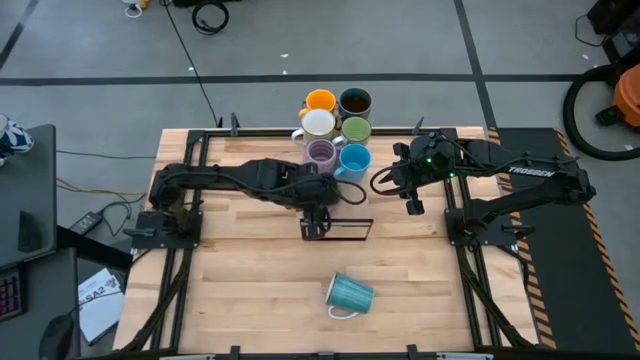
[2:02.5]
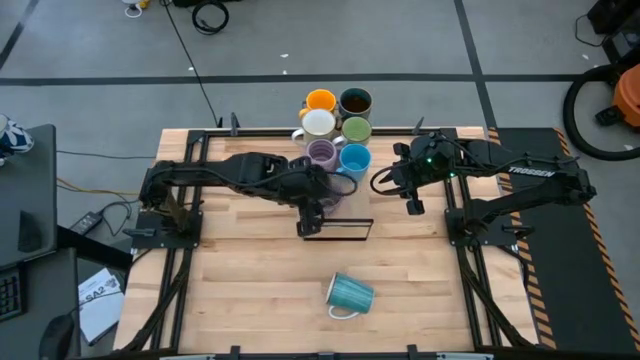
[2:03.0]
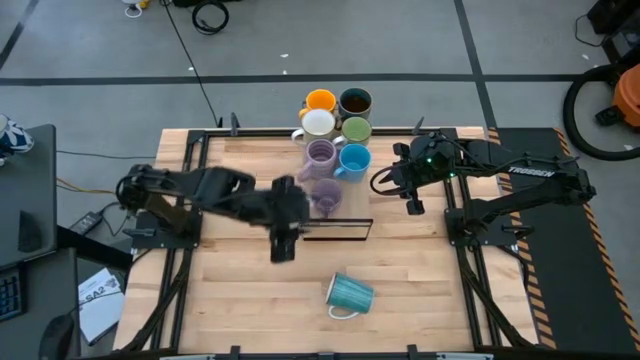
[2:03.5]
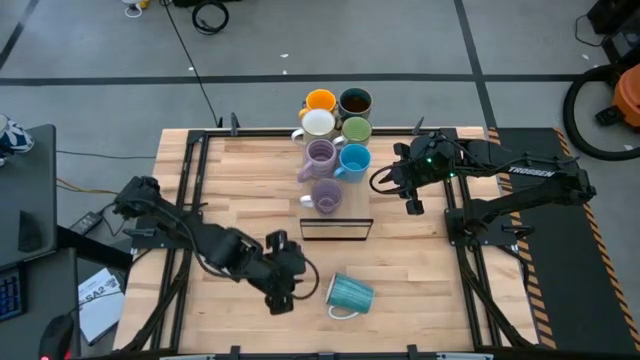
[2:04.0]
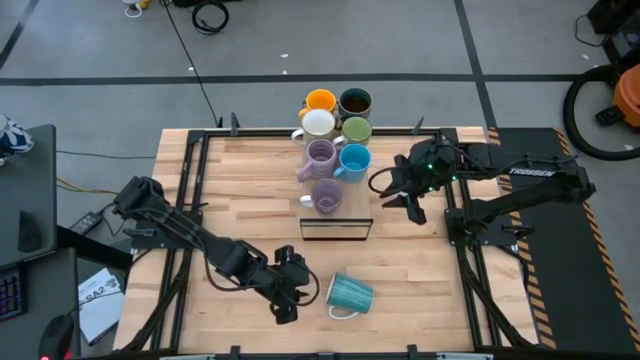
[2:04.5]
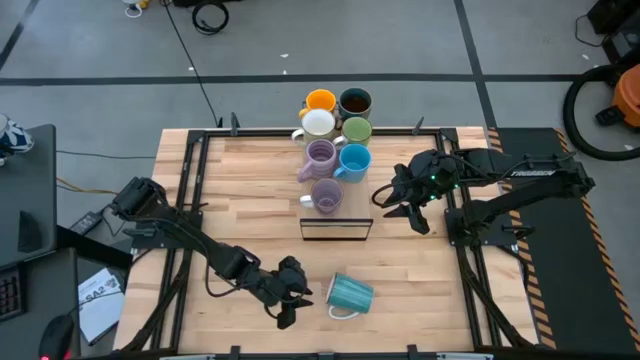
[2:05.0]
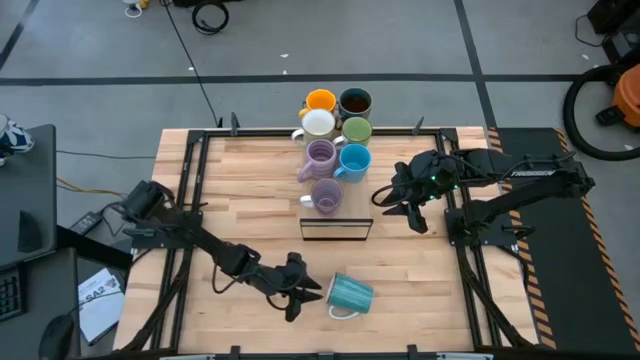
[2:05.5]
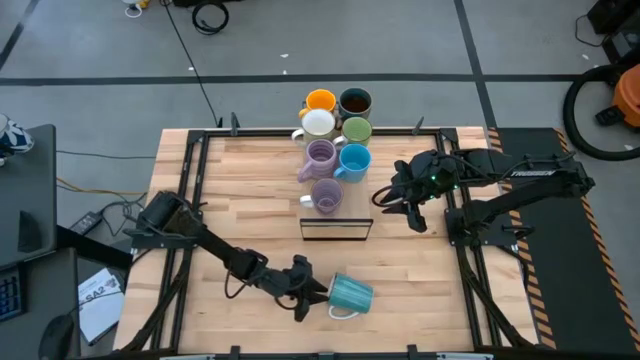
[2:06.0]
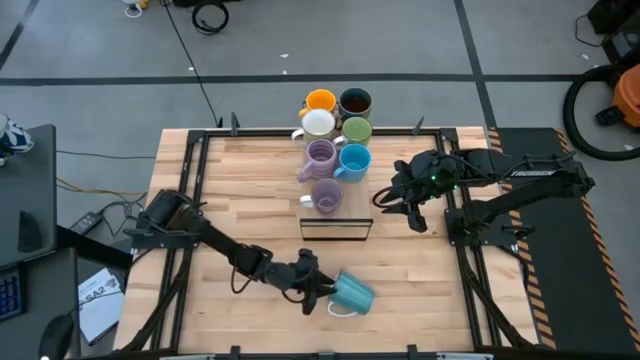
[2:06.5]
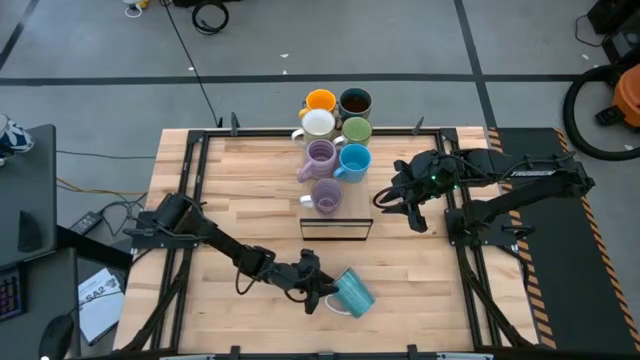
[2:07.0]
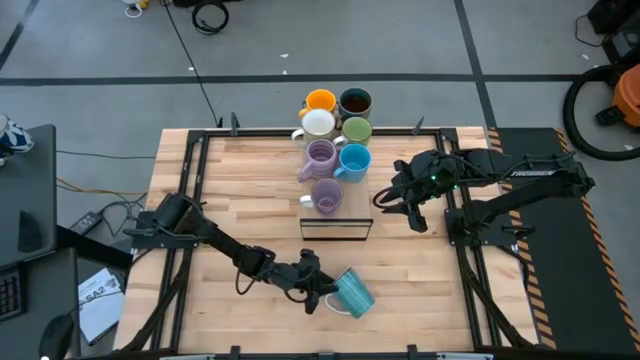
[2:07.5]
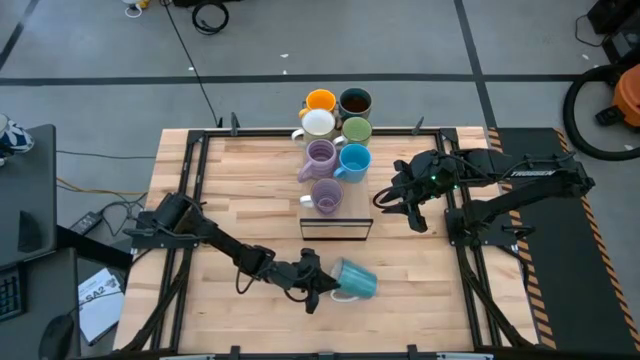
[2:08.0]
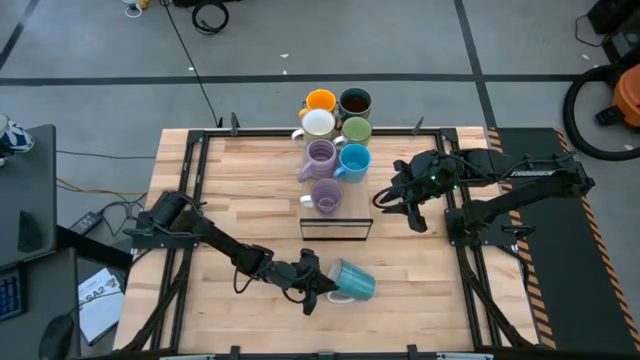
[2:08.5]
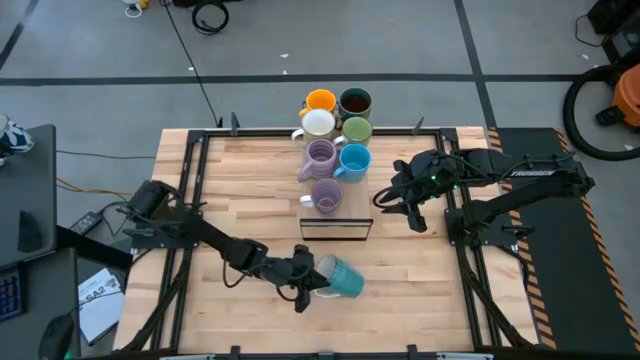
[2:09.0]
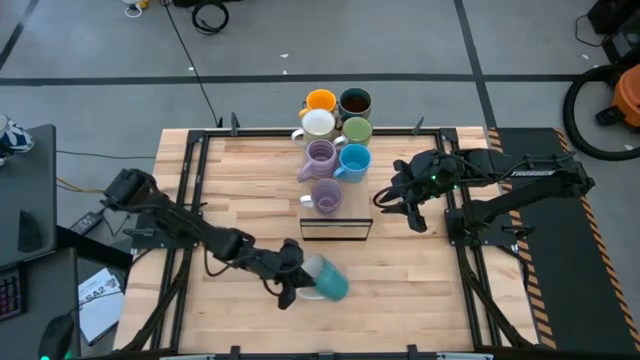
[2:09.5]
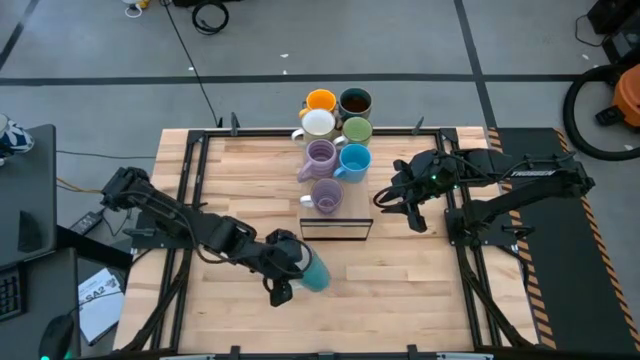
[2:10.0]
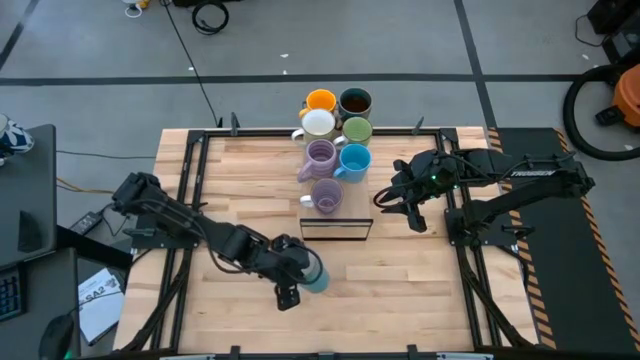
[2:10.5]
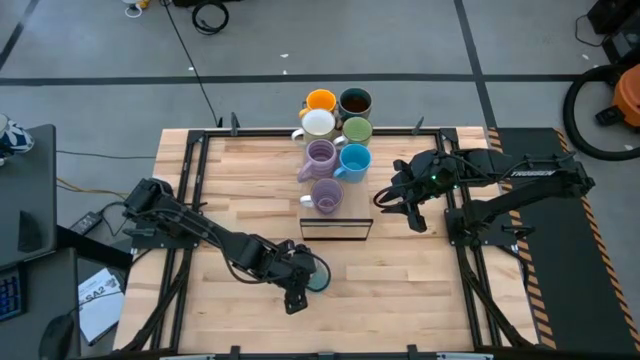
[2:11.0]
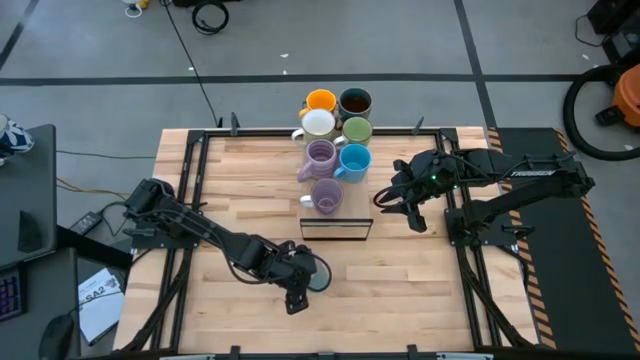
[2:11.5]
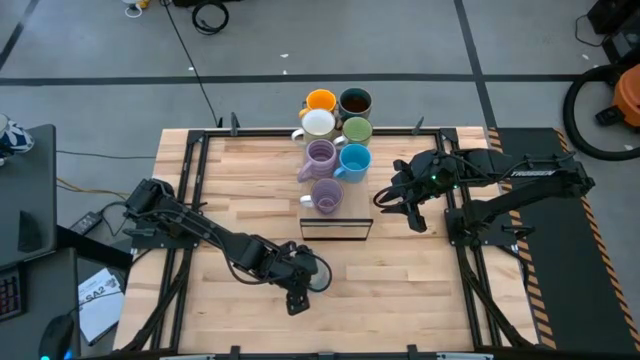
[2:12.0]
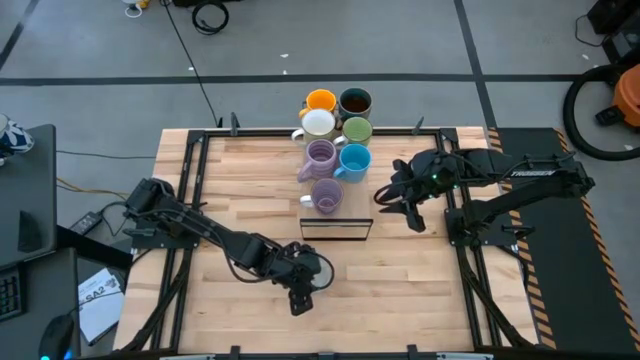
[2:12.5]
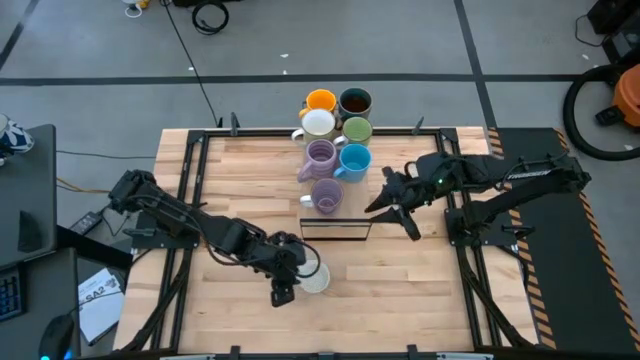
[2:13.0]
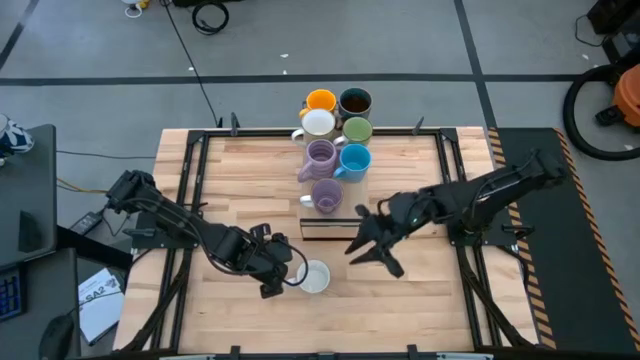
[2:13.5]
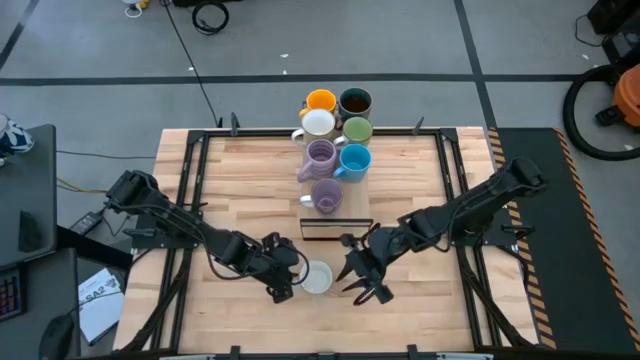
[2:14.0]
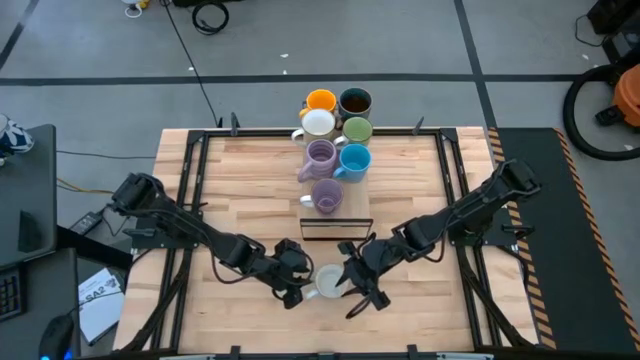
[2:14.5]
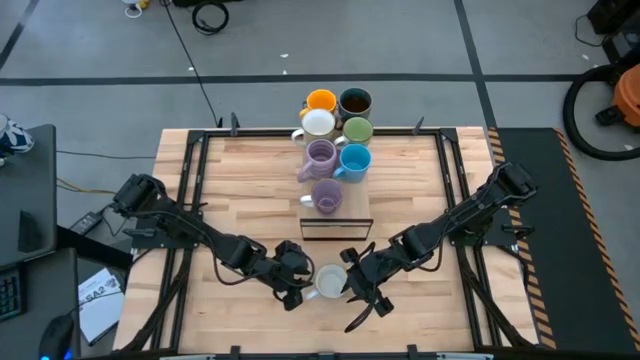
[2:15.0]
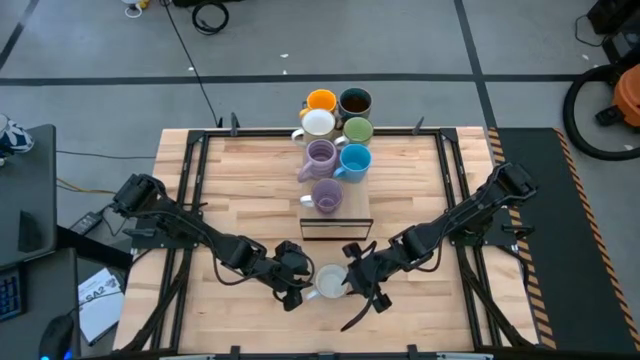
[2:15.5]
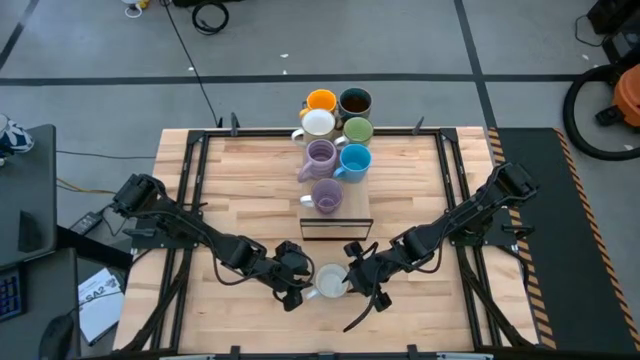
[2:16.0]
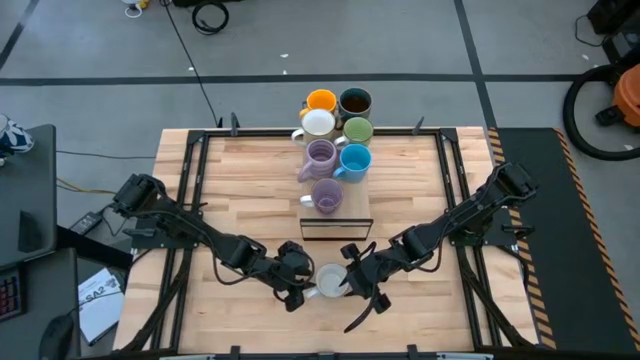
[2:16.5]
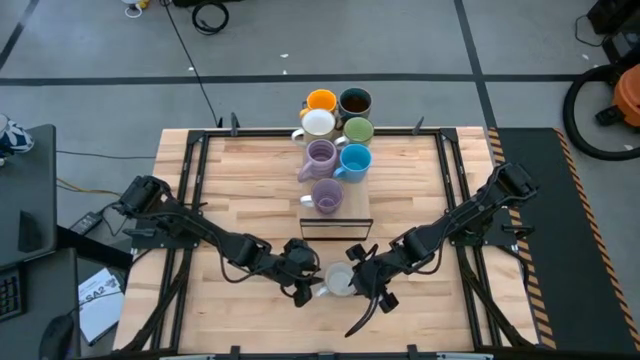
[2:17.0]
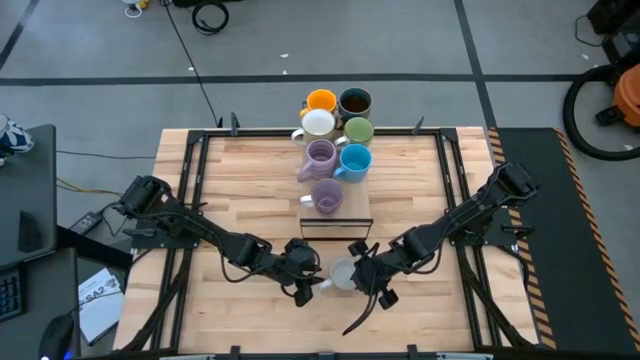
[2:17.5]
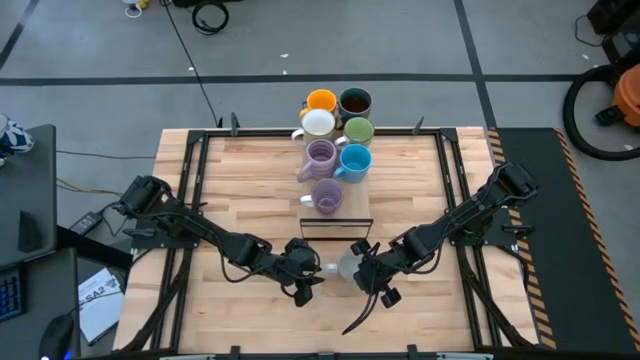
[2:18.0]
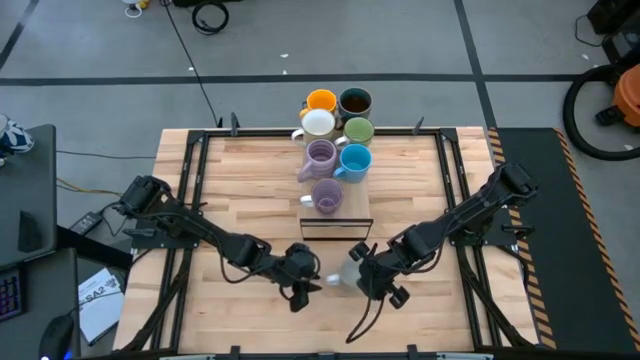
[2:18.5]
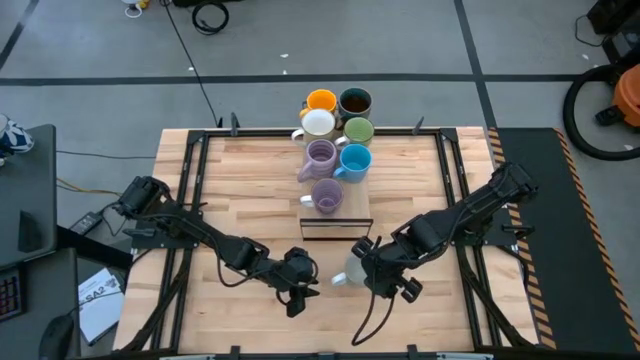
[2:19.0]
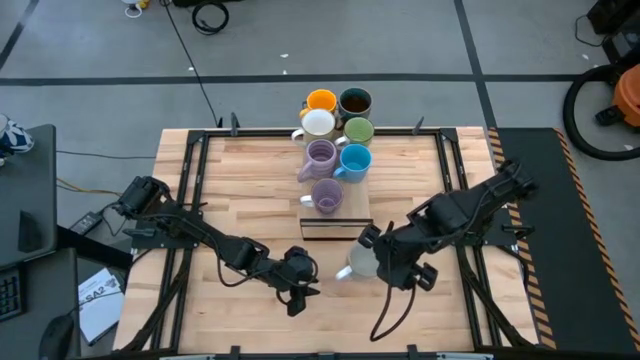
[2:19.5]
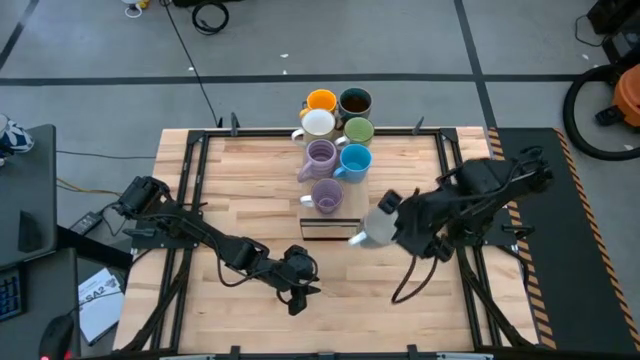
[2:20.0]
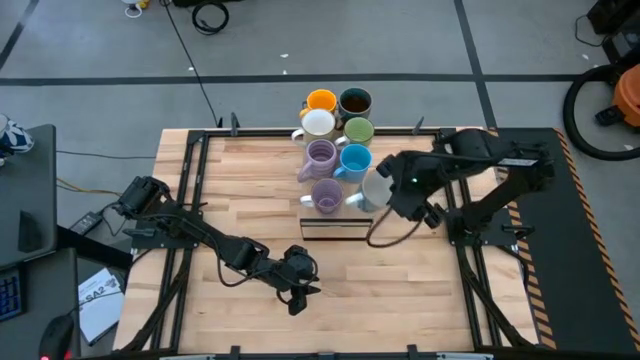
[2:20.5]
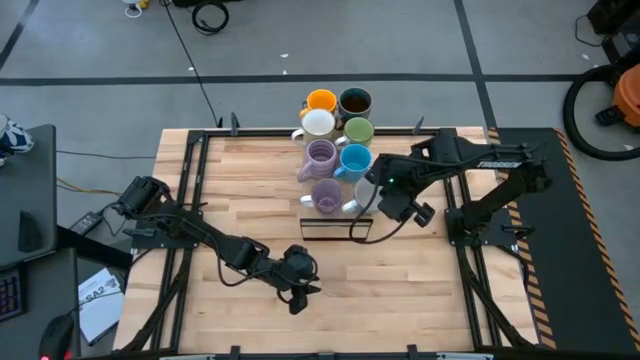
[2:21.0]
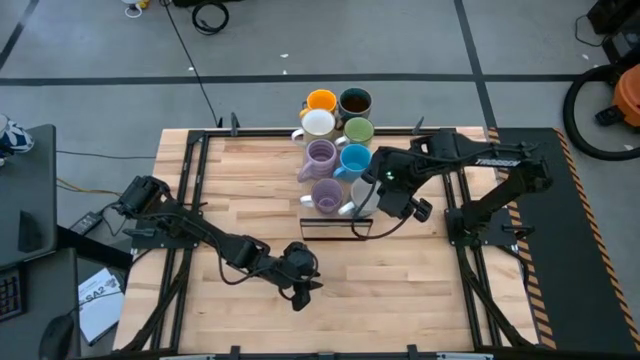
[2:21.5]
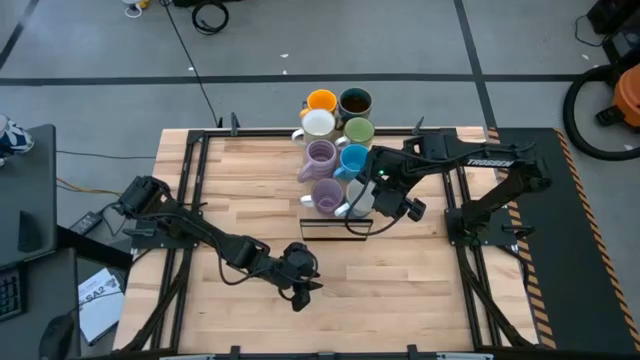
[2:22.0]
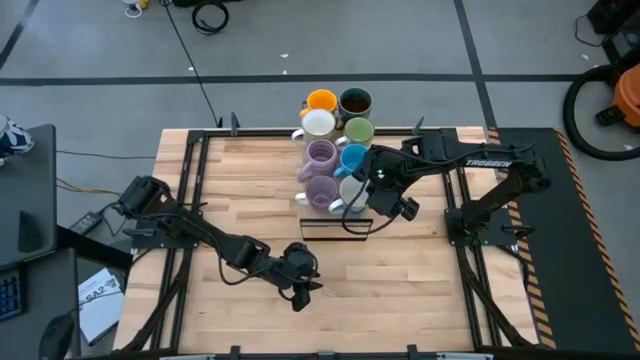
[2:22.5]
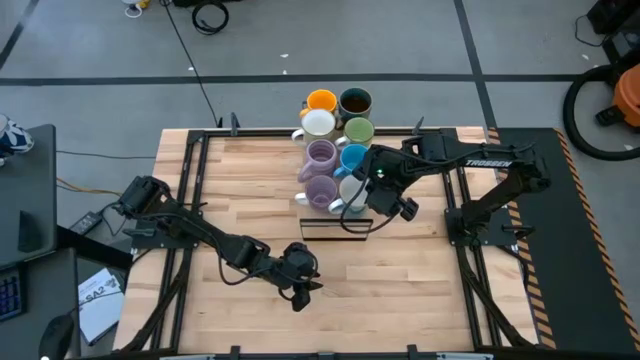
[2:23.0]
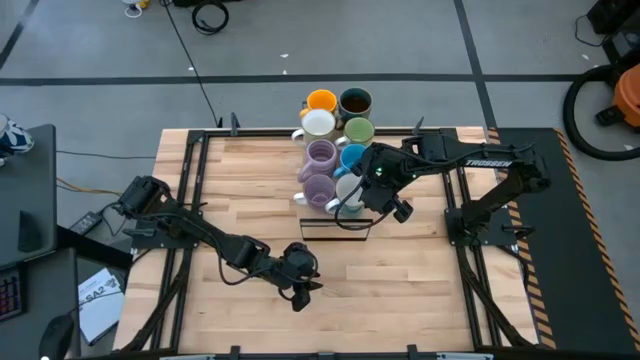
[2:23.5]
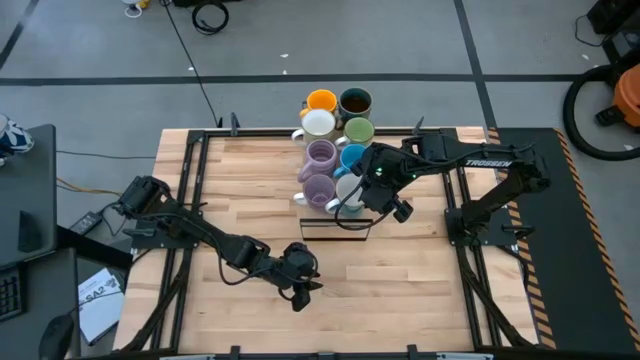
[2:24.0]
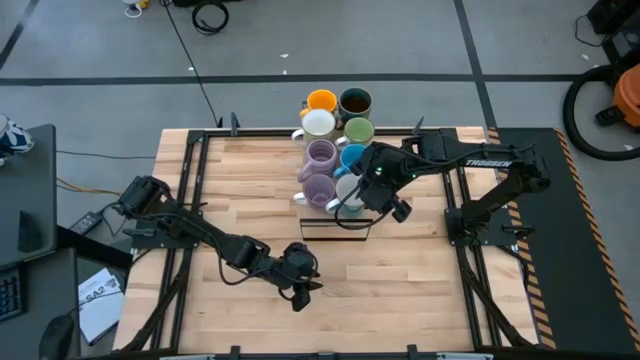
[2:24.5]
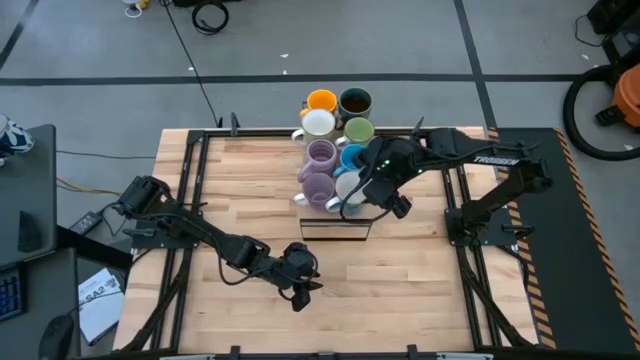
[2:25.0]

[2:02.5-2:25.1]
Task: Place coffee mugs
Put the white and blue mug on the shelf
